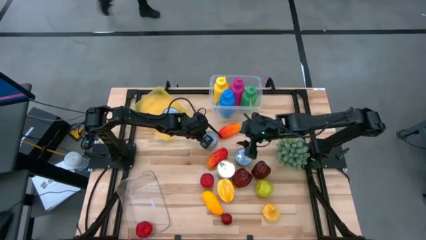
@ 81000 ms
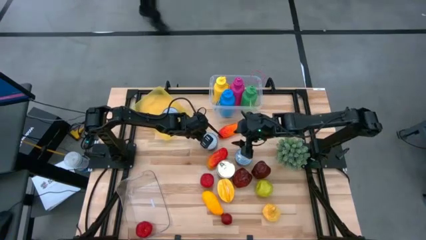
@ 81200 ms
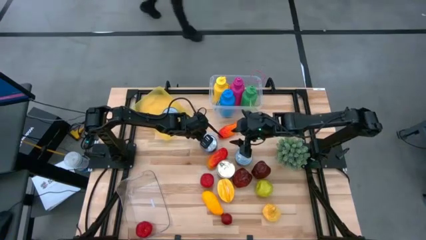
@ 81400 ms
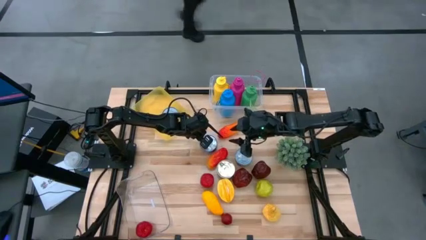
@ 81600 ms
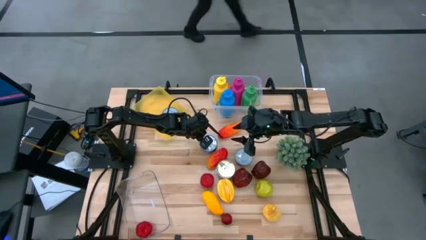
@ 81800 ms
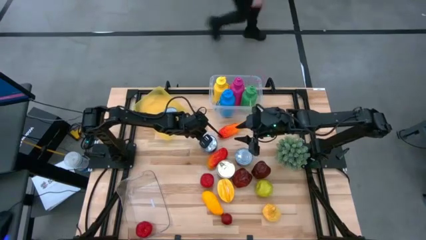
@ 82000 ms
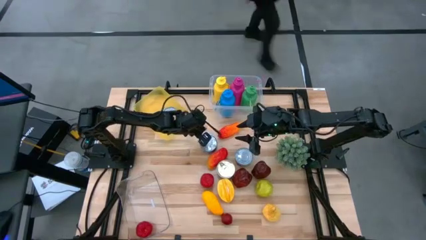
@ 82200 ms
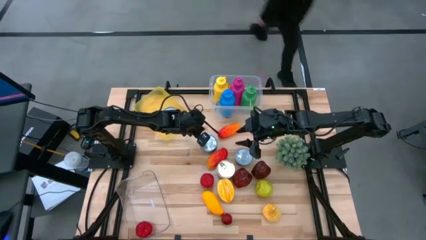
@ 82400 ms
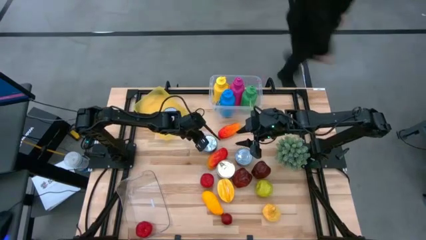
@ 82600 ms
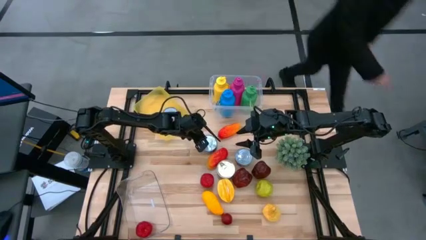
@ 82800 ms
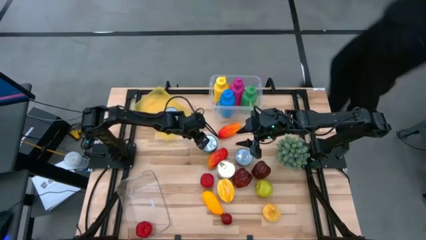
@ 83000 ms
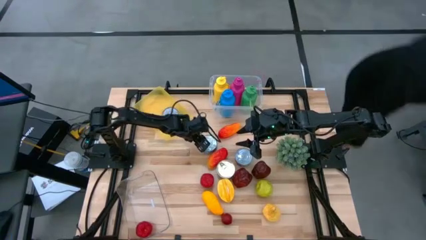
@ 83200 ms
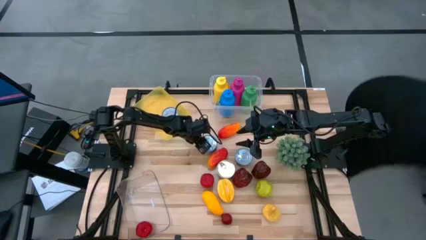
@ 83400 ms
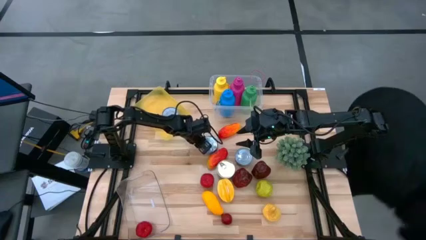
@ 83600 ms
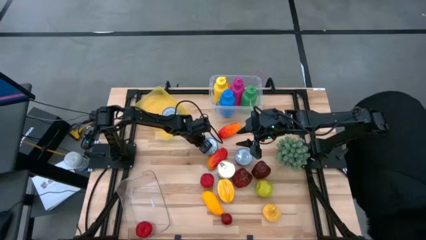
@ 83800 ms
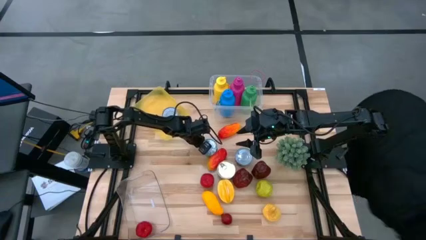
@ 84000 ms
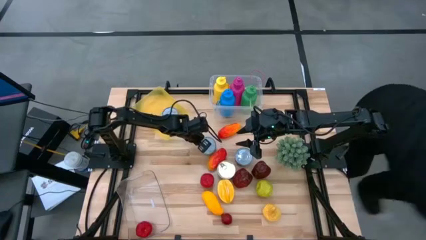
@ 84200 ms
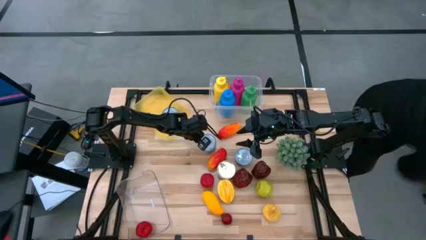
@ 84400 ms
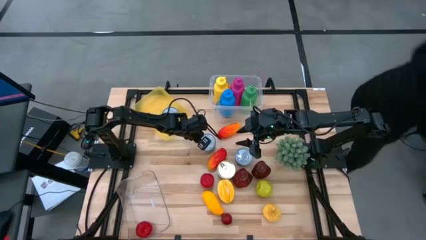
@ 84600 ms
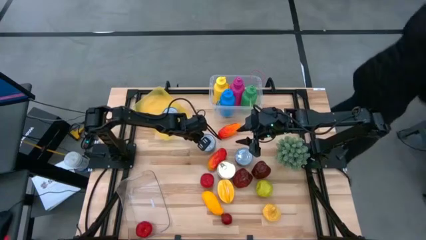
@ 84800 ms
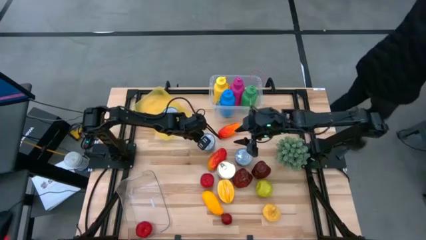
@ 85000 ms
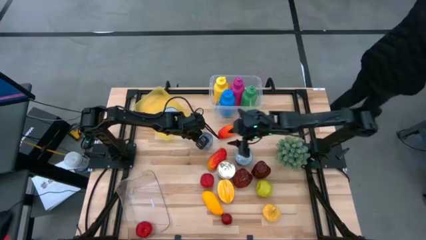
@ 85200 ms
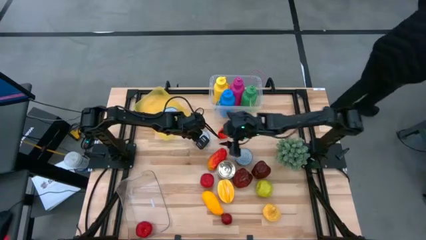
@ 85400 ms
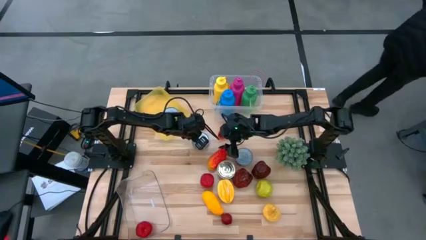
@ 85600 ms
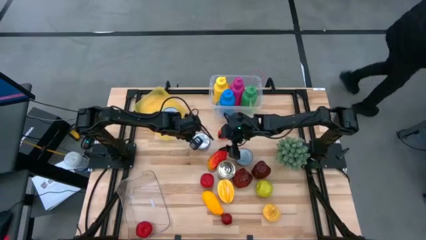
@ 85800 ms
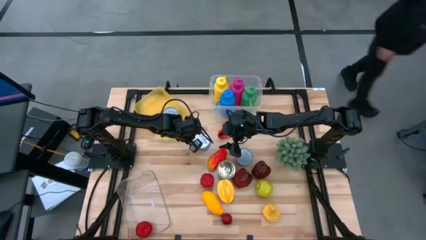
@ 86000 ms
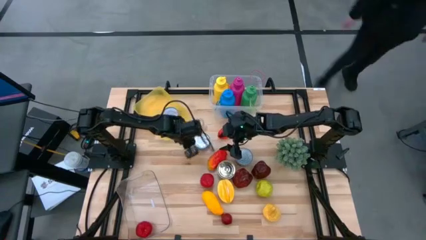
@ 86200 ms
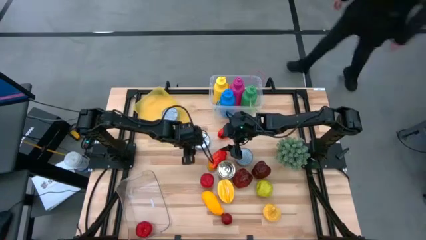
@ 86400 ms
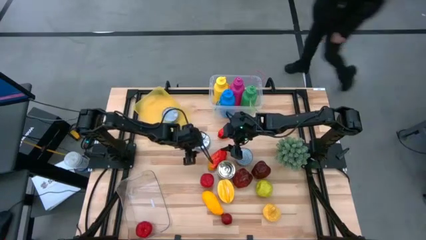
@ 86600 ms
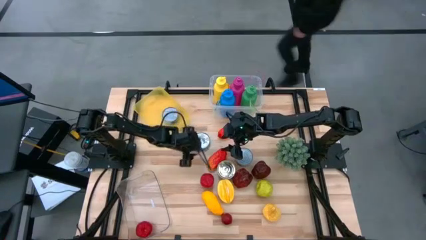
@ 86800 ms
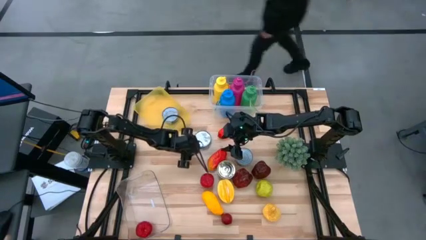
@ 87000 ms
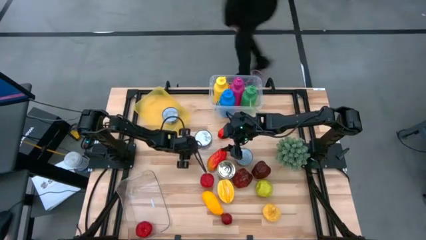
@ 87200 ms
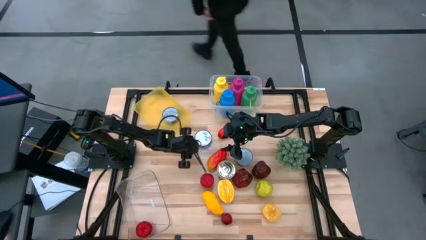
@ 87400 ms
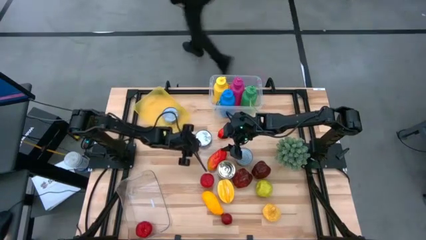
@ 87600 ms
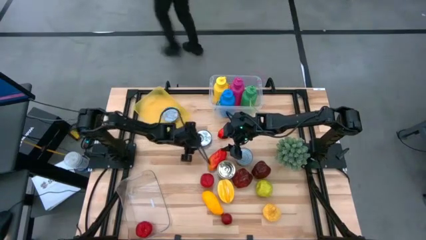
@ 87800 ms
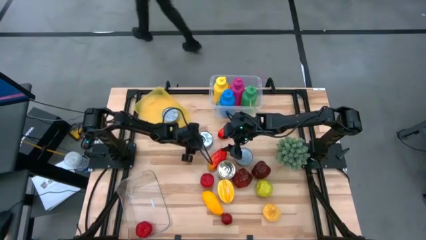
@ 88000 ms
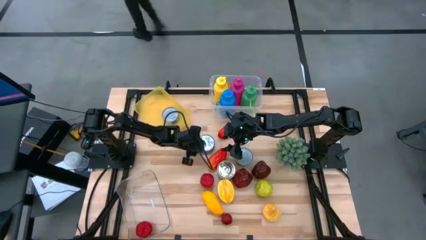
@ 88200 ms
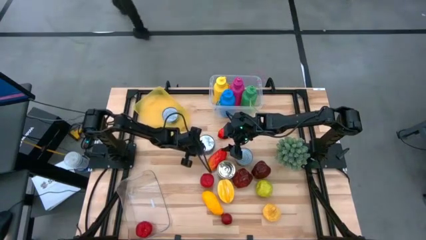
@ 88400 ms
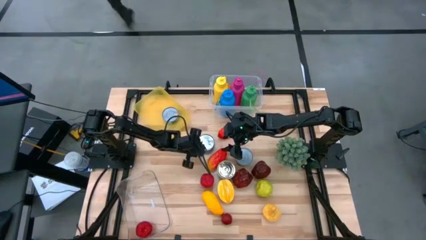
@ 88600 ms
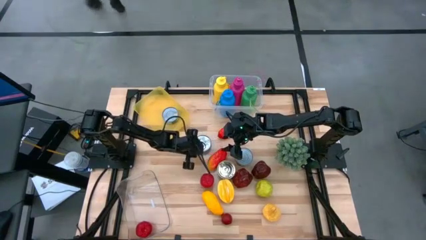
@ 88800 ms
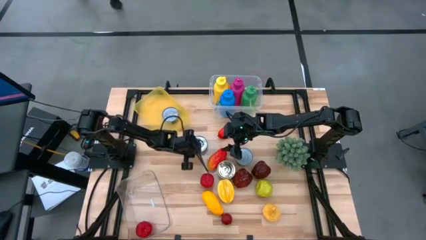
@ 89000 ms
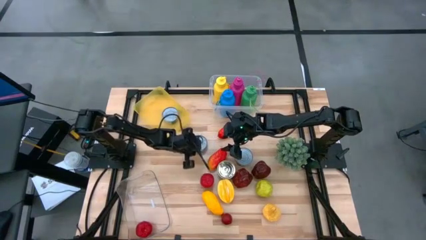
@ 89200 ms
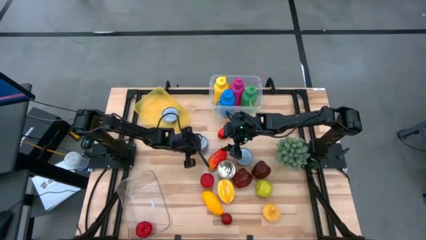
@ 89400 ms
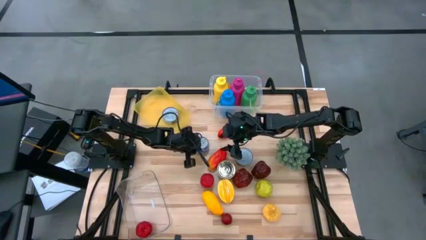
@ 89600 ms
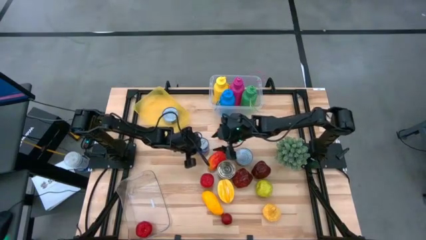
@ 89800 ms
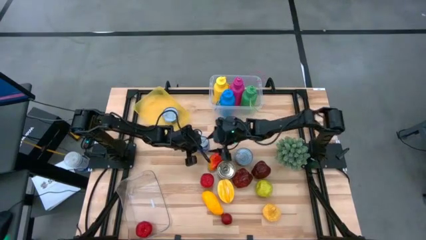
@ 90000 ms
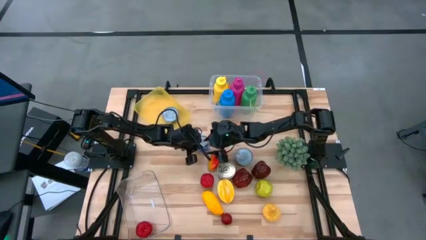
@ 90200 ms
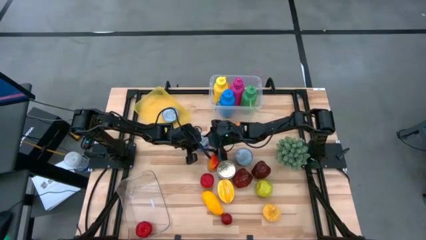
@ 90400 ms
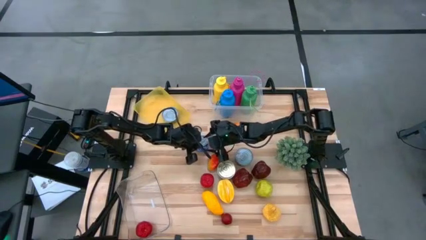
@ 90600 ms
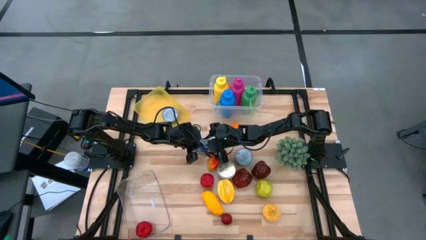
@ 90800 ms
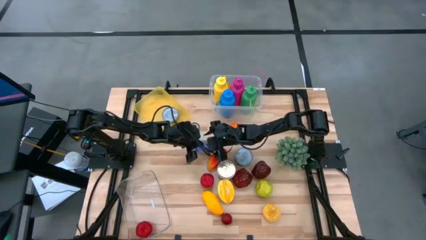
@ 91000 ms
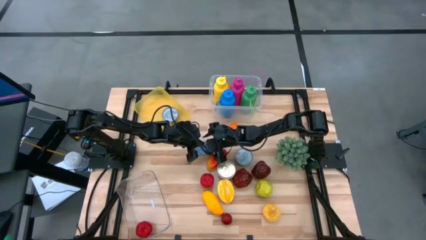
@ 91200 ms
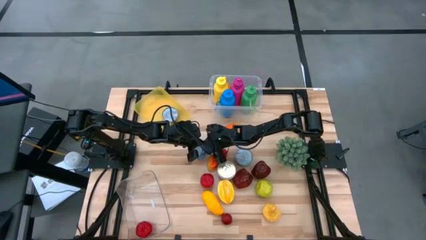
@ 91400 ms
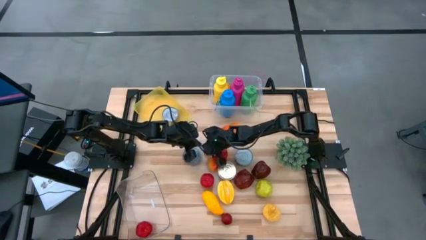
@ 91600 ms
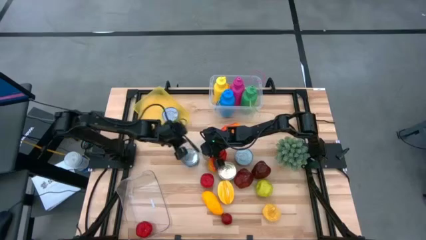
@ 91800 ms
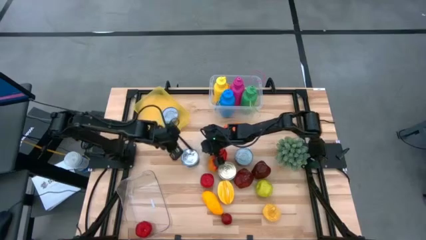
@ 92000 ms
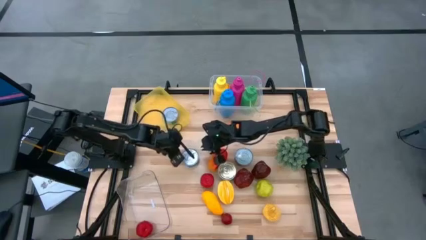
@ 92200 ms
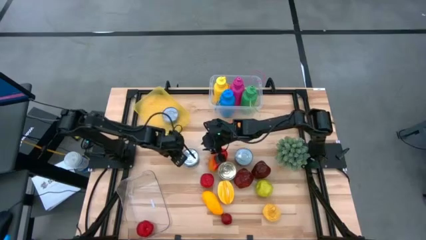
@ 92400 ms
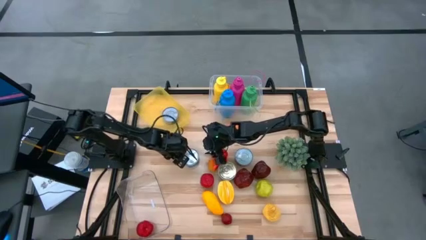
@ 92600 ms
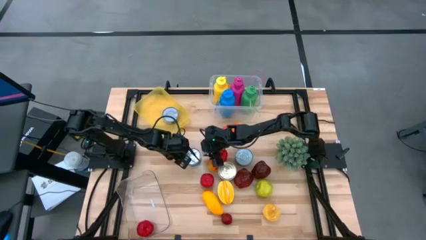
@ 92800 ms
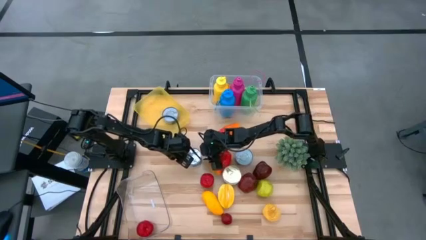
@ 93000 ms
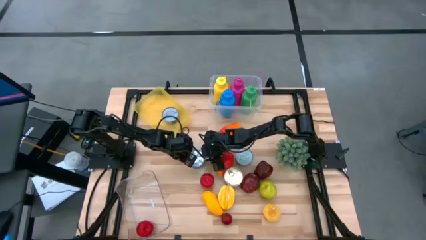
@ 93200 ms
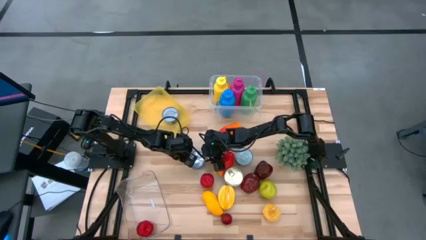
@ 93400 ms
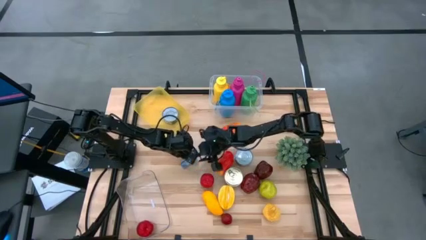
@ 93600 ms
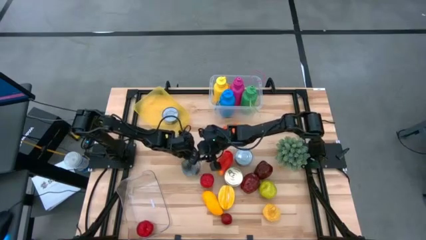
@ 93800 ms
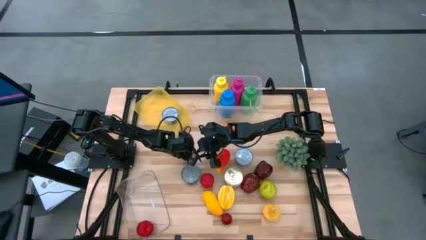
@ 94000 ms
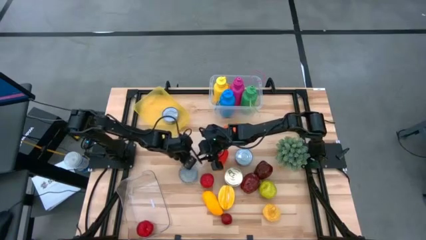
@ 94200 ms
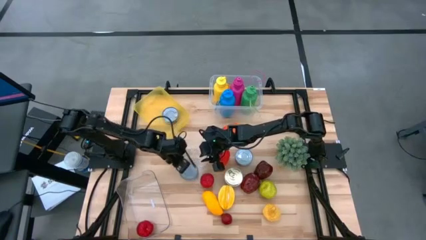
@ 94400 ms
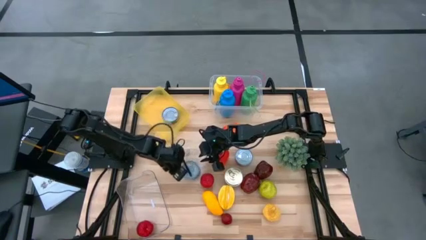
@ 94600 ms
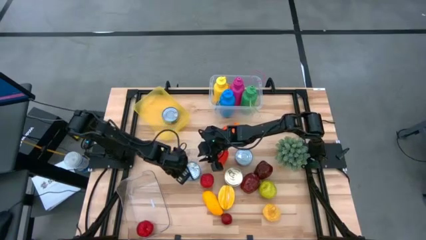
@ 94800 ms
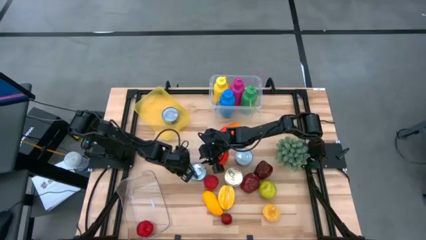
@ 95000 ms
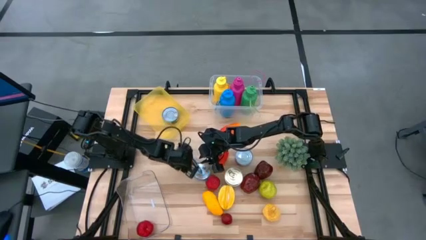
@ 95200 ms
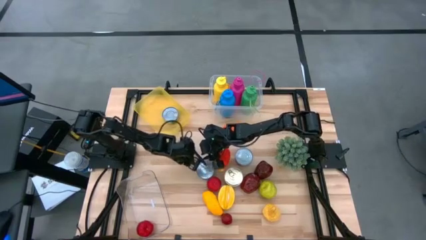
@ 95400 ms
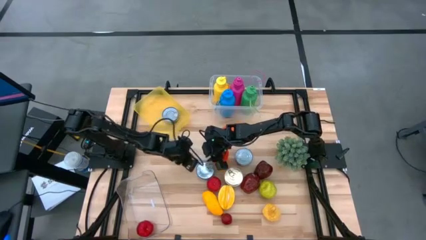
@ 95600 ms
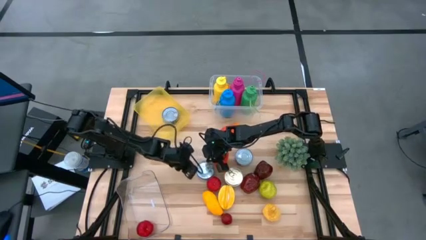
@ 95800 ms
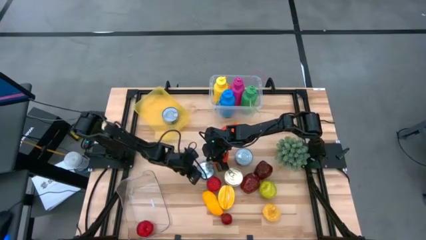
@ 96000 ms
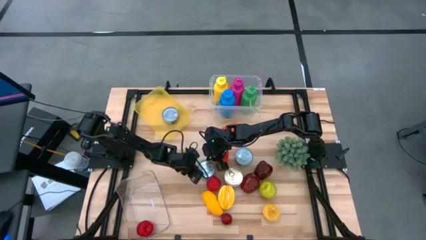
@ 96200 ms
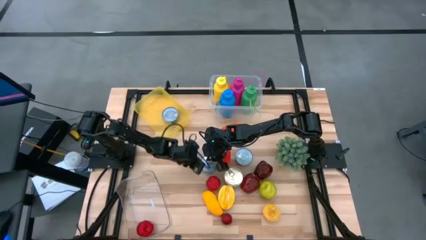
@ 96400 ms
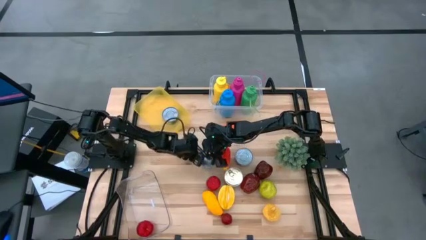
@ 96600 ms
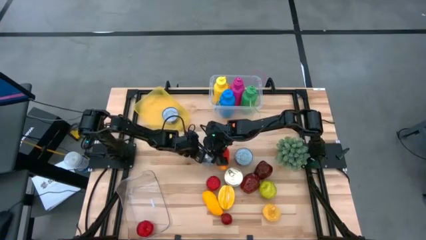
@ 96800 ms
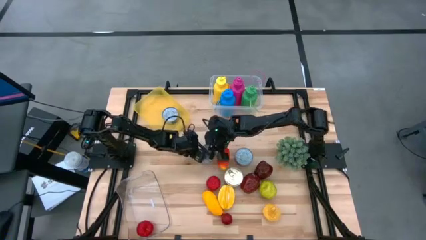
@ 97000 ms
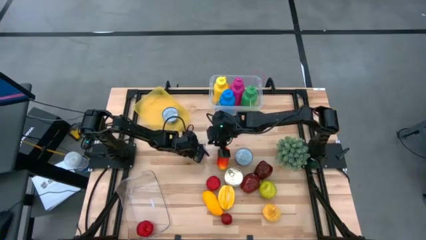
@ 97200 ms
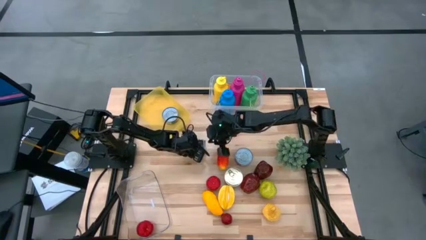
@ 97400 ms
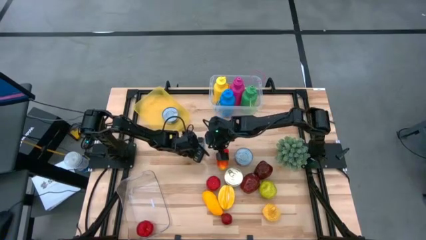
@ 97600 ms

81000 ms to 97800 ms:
Task: Pick & Place Food Item
Put the blue tuna can into the yellow bin
